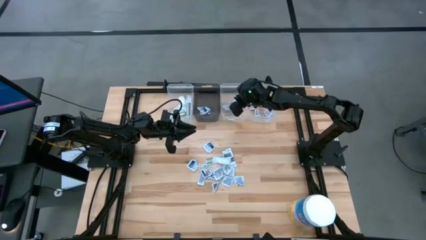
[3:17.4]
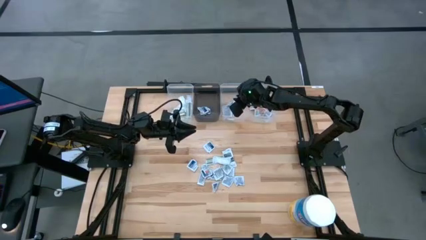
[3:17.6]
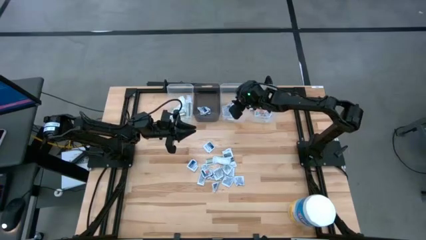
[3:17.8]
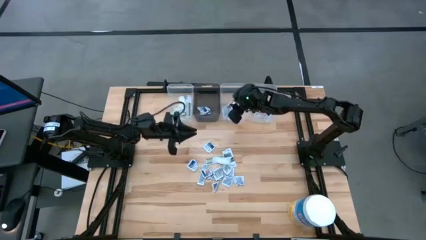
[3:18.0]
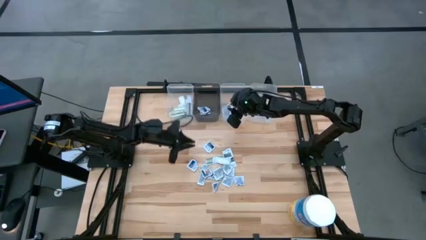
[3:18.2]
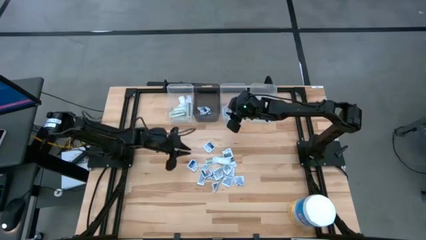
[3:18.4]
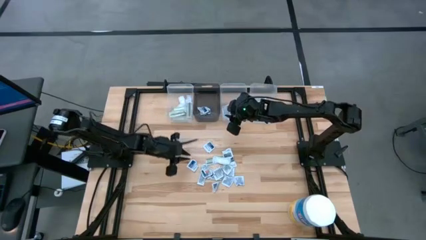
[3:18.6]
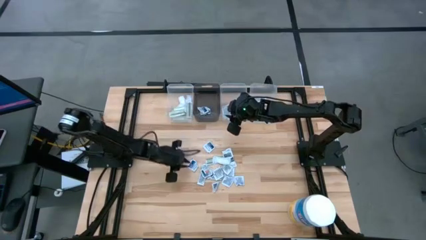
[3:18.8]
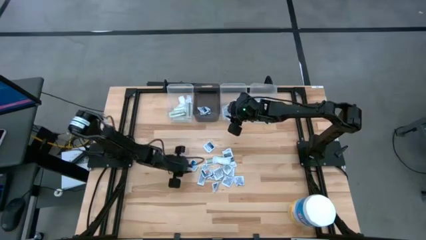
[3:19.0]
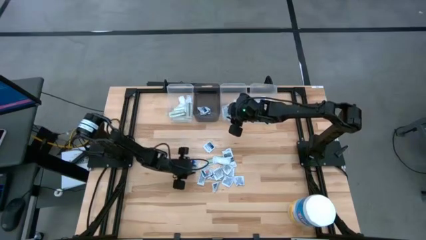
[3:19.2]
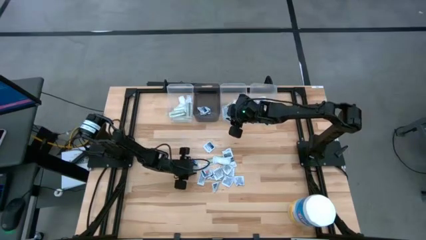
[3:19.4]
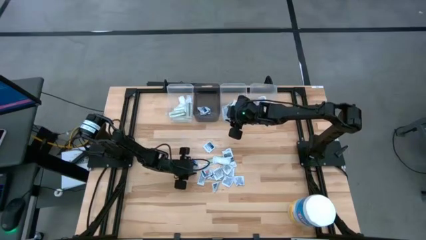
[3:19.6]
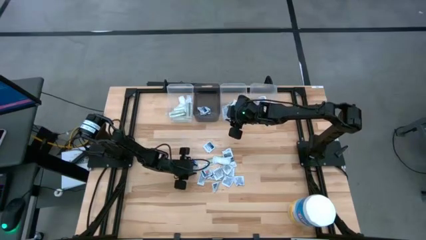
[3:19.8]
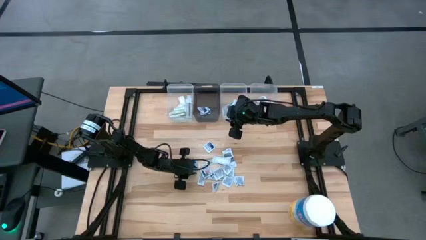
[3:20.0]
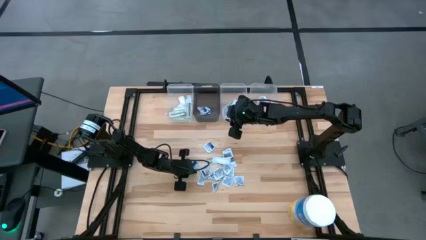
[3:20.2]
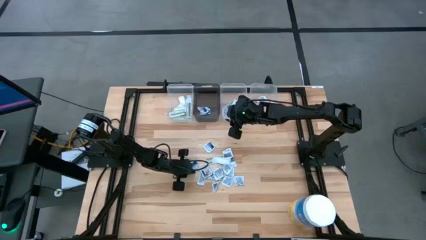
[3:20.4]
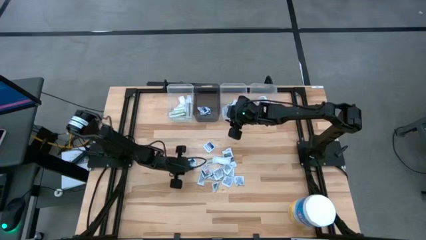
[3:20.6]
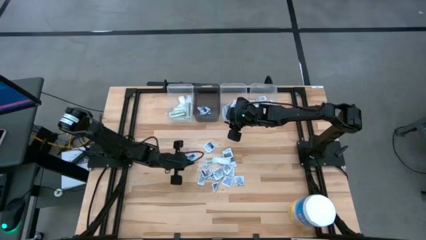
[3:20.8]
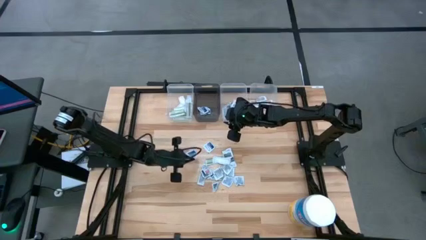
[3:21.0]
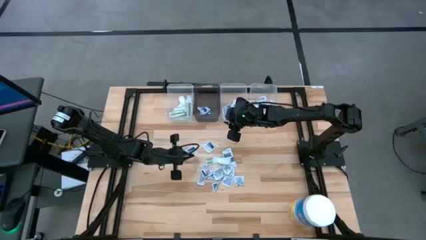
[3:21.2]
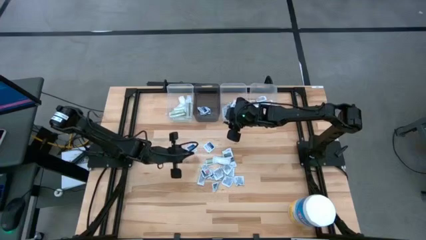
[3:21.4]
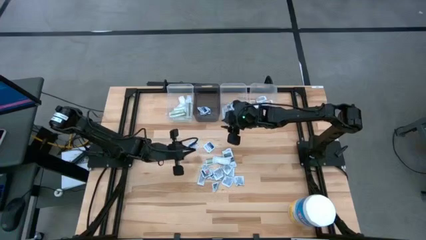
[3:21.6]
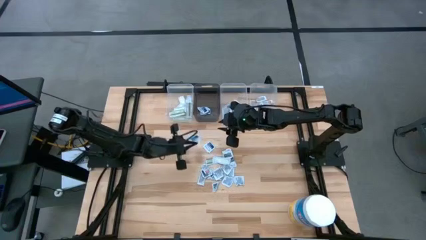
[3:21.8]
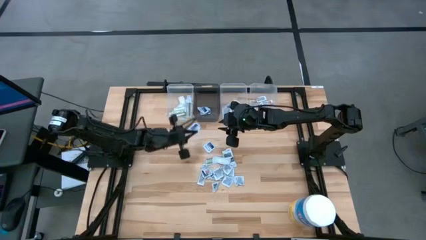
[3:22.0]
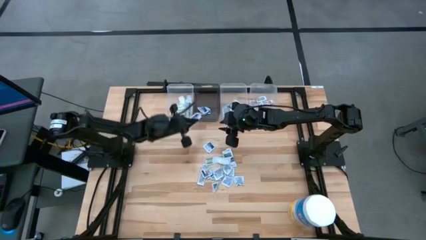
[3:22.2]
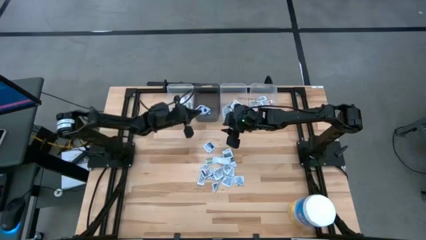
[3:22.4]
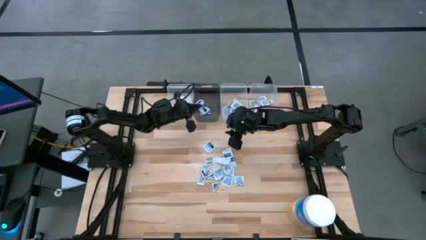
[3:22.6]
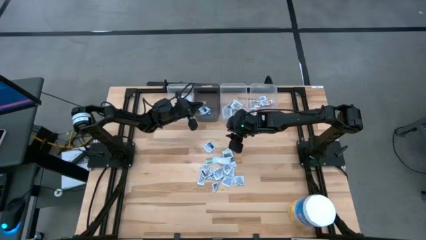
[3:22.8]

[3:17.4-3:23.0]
Task: Pick & Place First Aid Supplies
Put the alcohol pad into the black bin

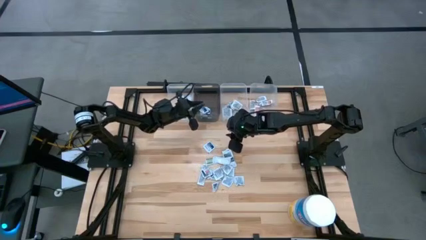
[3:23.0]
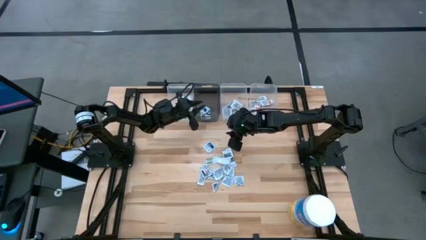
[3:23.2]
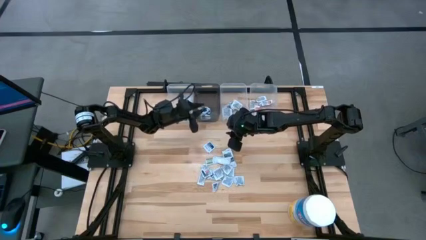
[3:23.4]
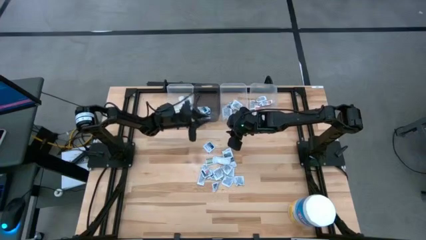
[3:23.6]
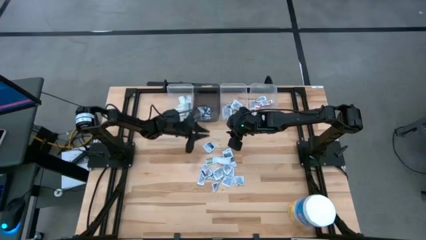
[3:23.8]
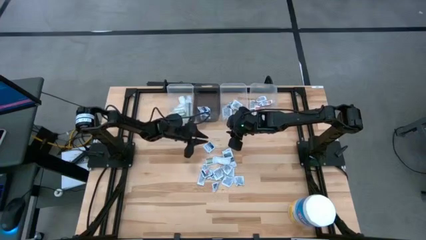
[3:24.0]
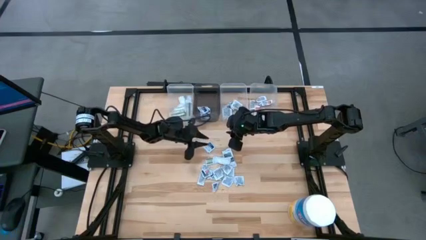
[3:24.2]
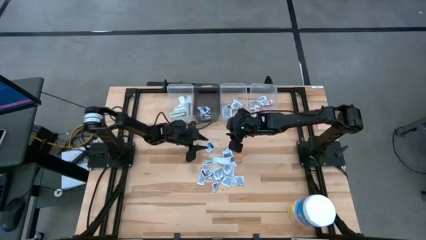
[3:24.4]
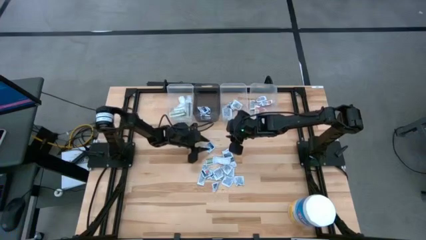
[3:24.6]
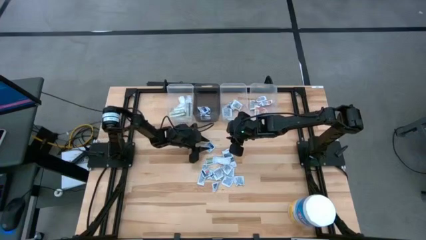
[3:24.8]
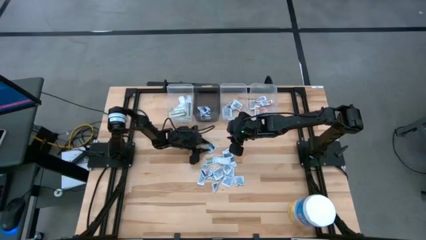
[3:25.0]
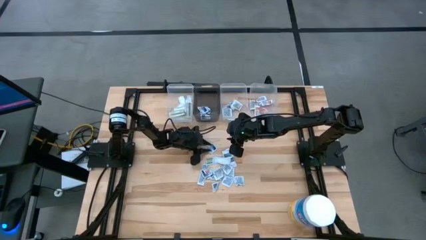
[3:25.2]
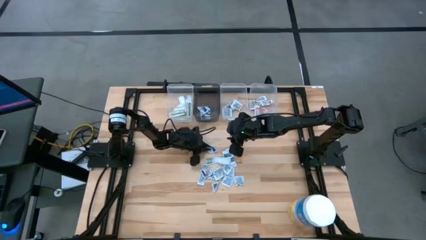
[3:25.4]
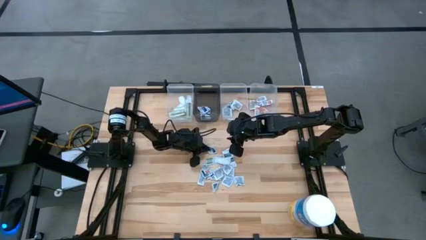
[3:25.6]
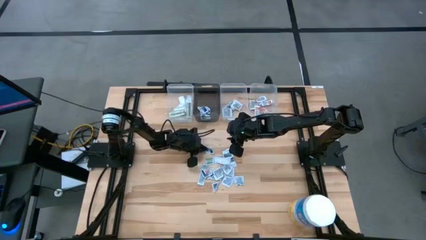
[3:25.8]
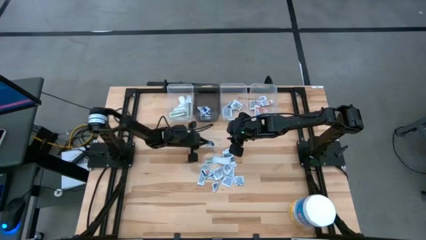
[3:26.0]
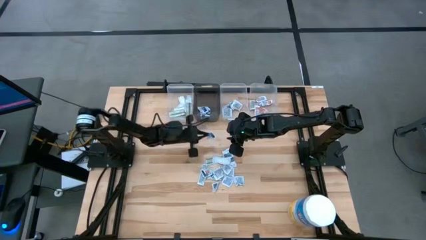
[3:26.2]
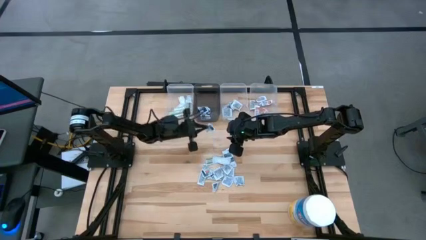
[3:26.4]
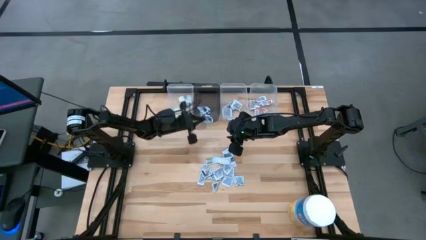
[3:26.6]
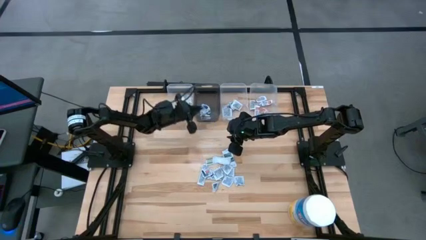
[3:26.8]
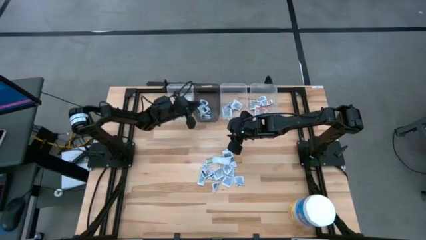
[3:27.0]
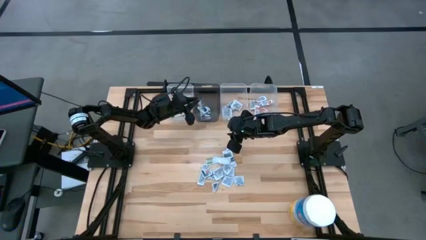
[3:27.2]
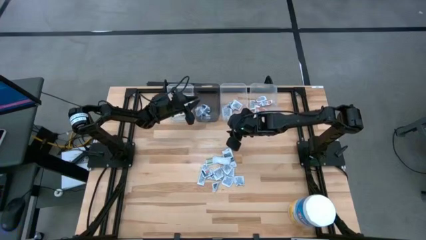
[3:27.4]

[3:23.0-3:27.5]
Put the alcohol pad into the black bin

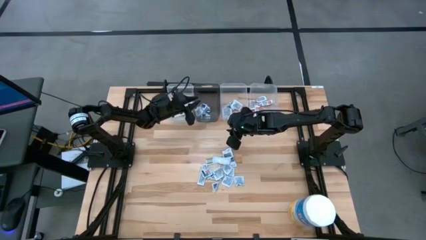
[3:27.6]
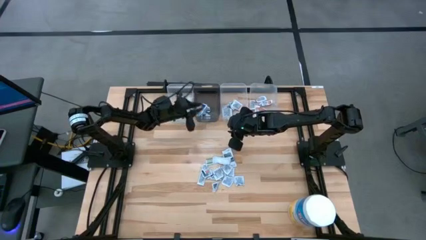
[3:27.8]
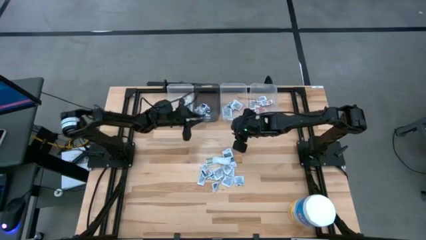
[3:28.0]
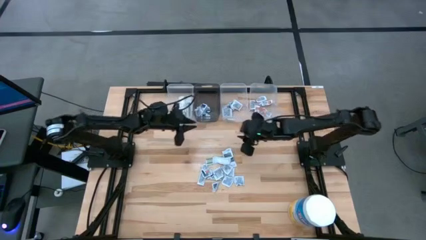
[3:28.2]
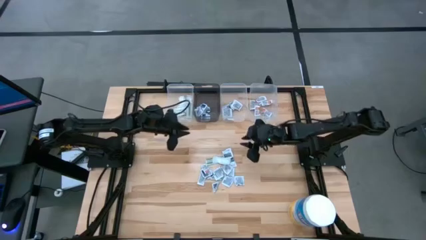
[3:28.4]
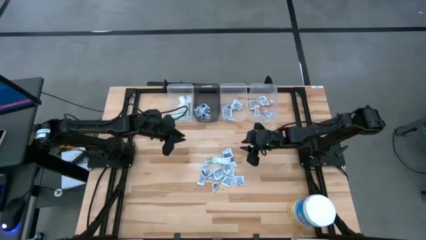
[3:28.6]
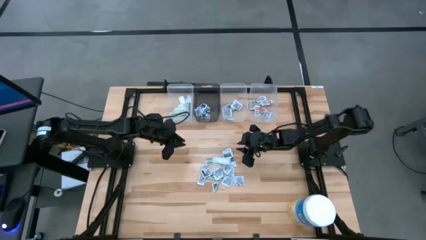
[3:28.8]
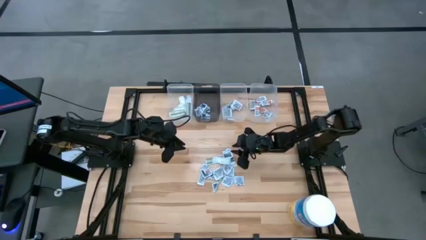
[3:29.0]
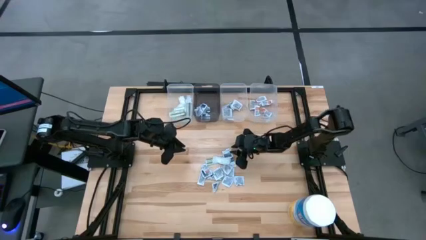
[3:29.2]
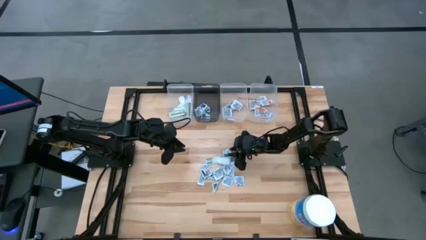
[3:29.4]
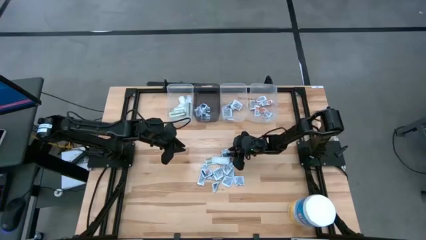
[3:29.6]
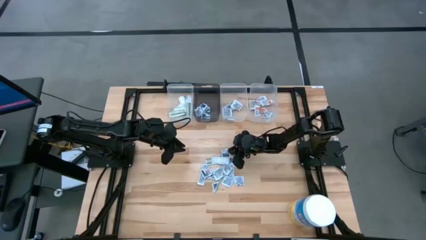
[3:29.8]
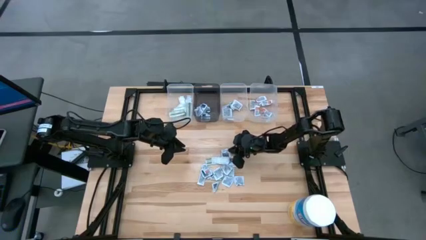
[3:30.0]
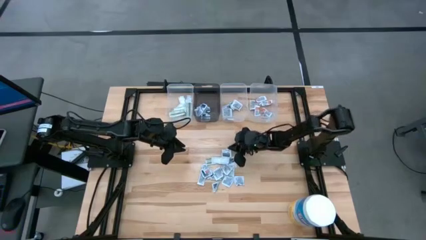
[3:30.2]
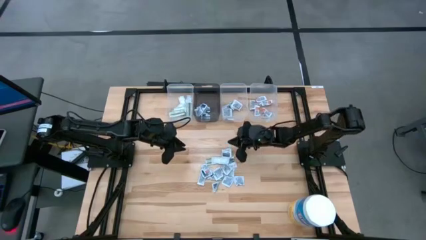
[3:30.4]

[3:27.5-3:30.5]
Put the towelette pack into the middle transparent bin

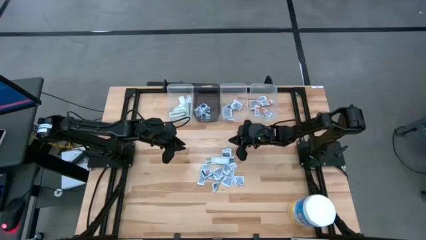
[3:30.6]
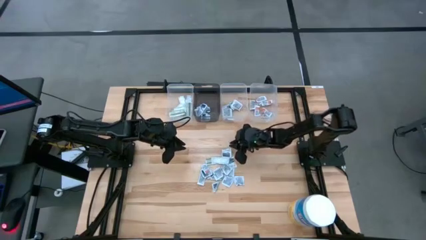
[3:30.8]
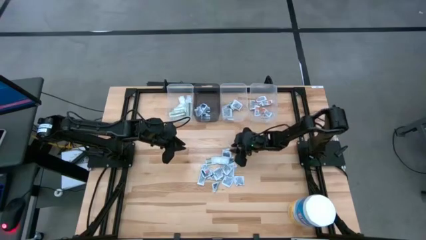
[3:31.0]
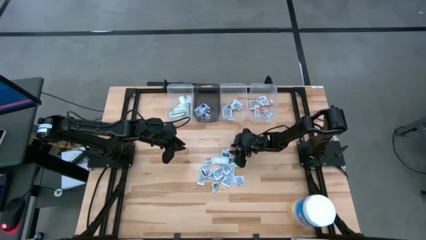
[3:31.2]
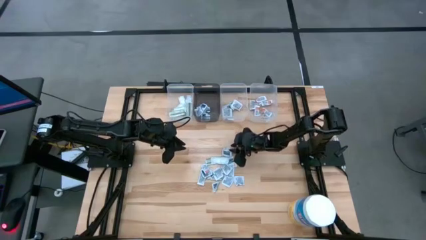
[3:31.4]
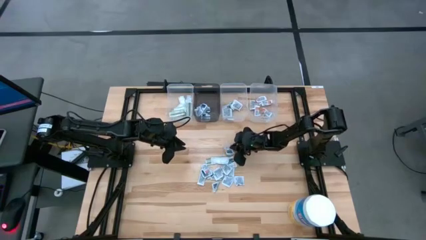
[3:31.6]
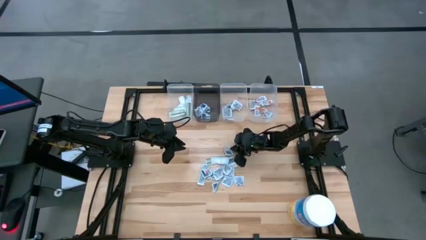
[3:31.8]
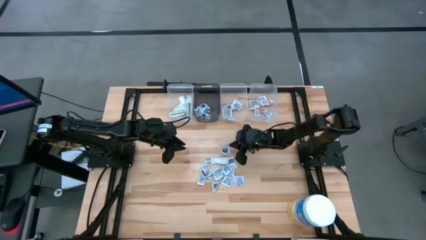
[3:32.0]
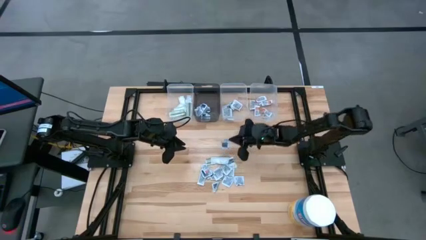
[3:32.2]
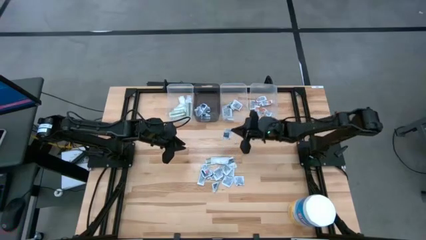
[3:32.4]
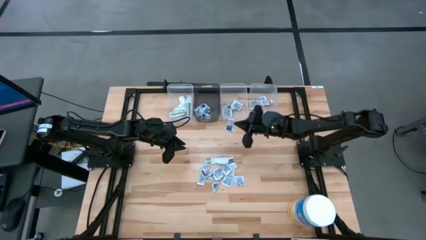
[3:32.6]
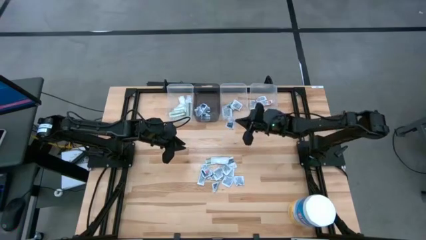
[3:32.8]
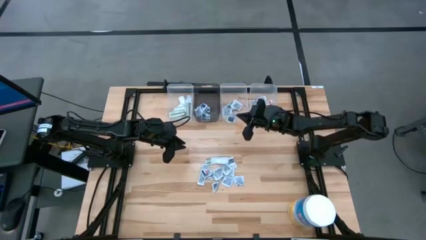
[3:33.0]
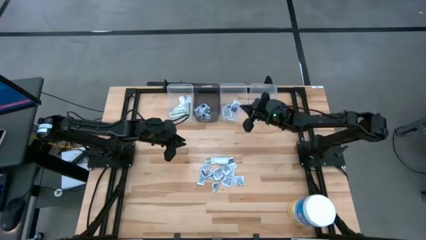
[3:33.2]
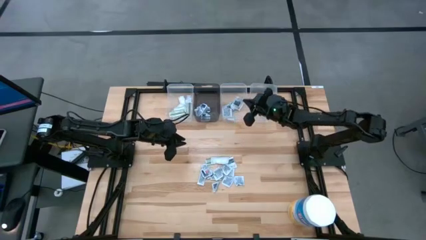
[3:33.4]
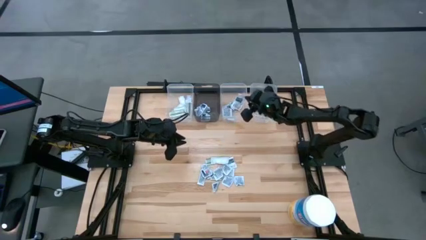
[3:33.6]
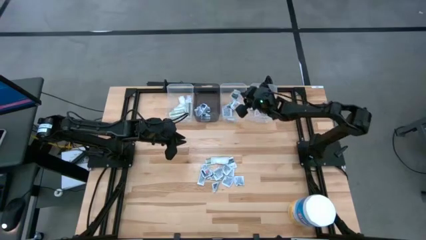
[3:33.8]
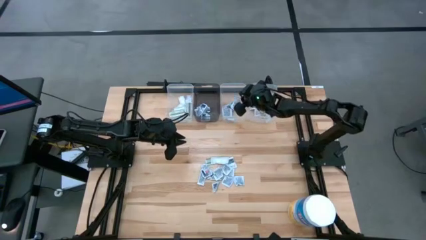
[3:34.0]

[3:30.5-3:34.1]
Put the towelette pack into the middle transparent bin

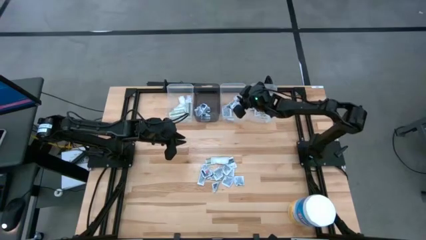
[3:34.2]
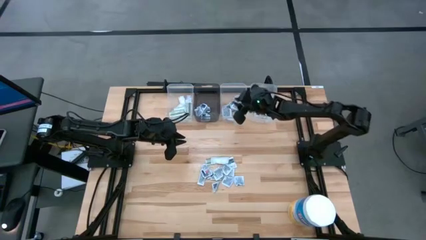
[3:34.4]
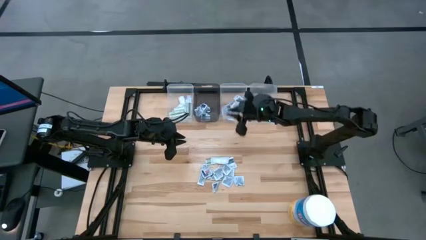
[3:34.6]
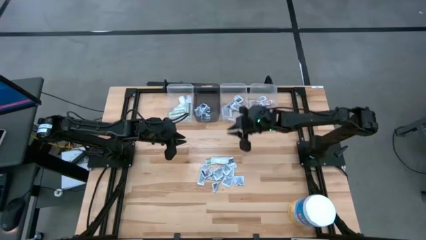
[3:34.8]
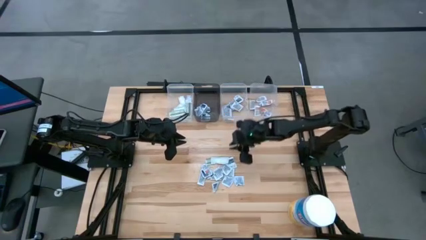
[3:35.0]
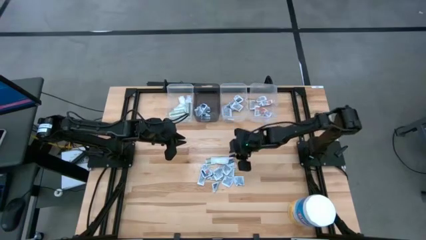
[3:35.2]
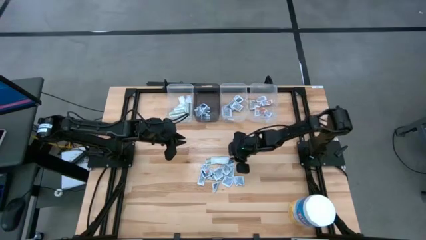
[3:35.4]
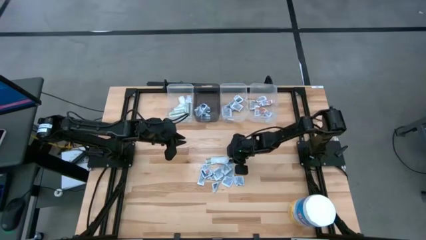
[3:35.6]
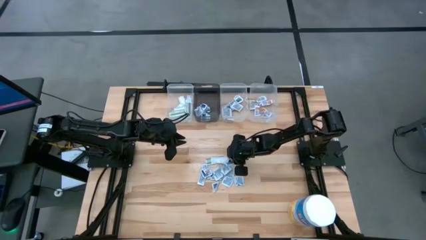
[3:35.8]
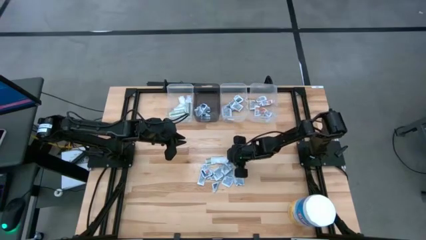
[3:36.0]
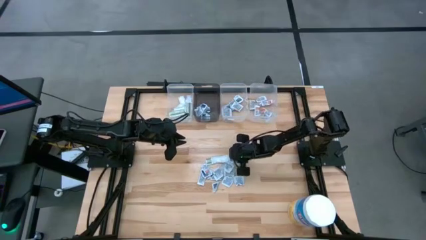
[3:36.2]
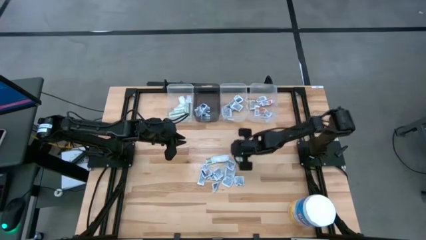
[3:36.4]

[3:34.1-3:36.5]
Put the towelette pack into the middle transparent bin
